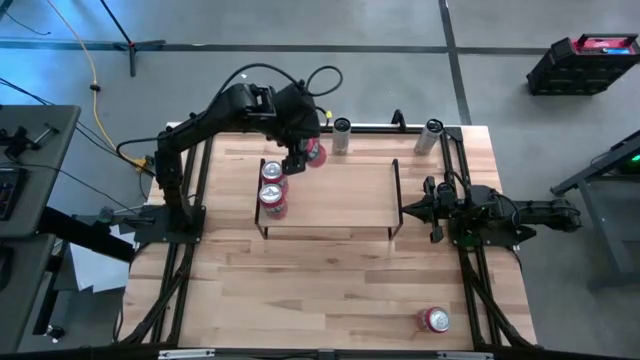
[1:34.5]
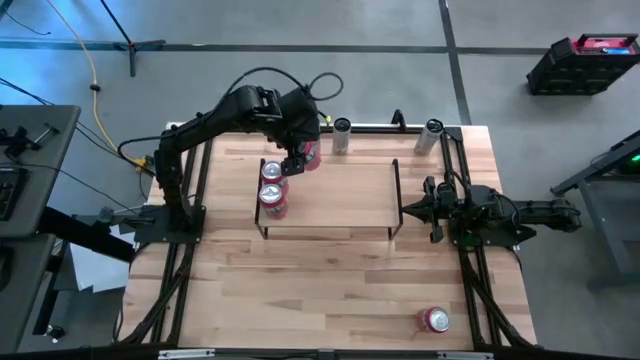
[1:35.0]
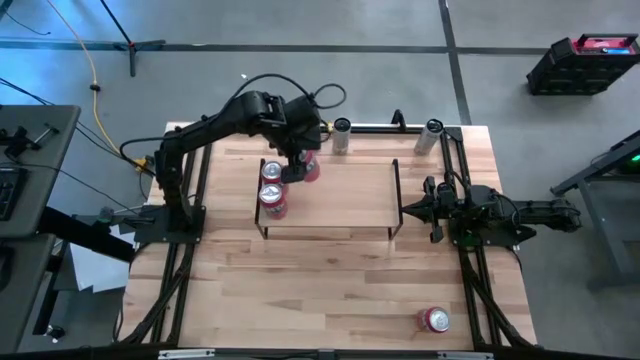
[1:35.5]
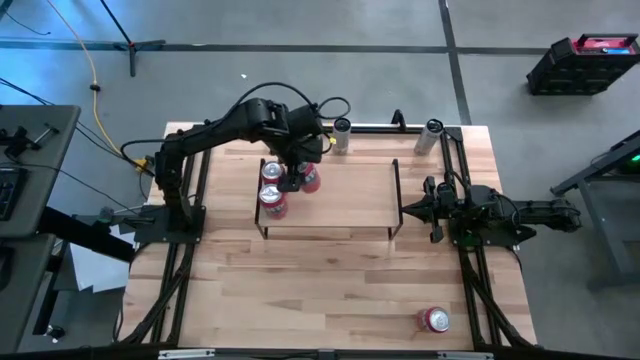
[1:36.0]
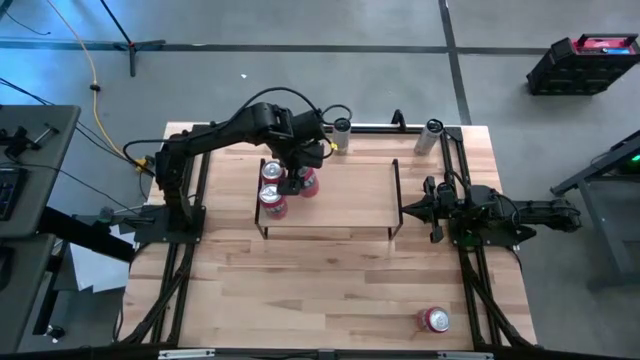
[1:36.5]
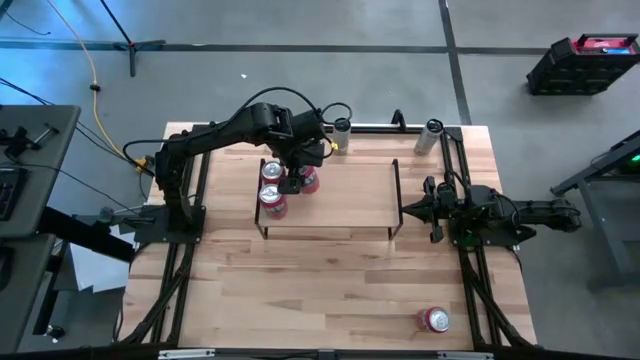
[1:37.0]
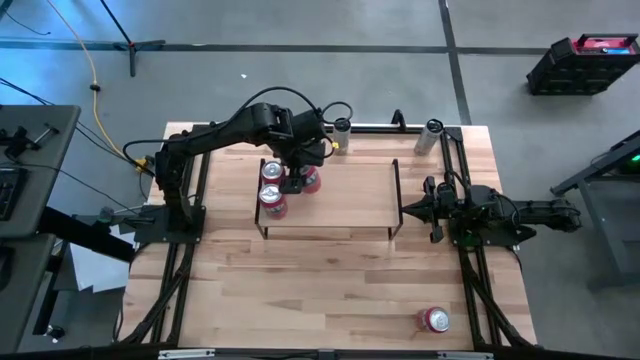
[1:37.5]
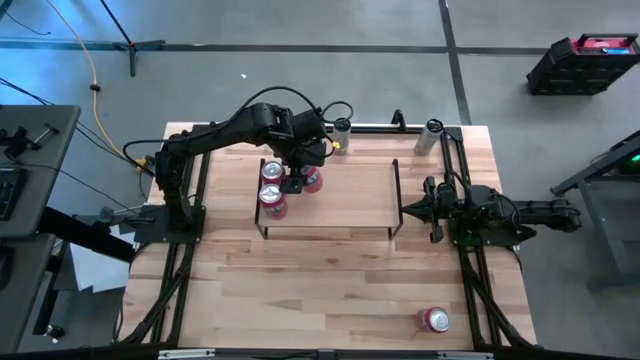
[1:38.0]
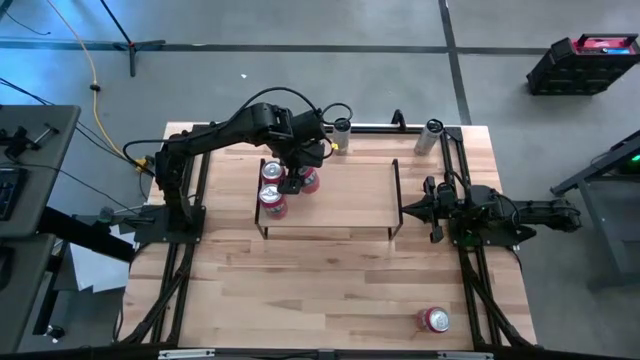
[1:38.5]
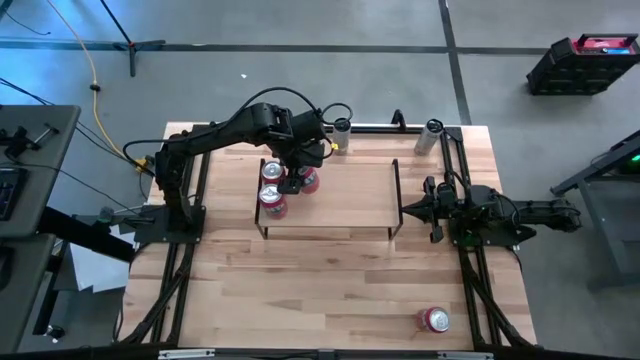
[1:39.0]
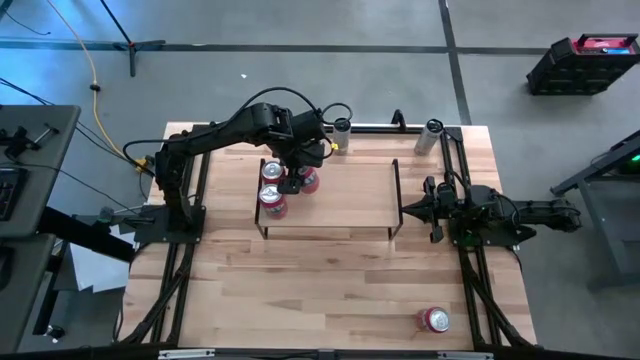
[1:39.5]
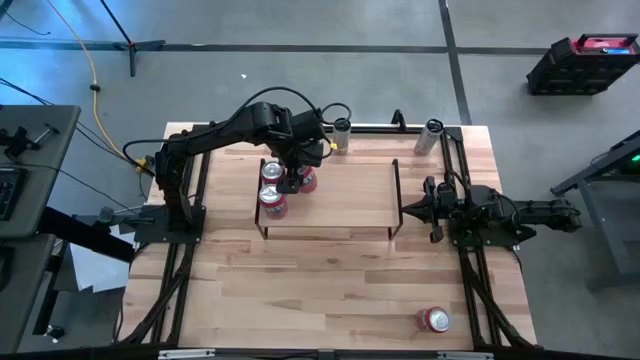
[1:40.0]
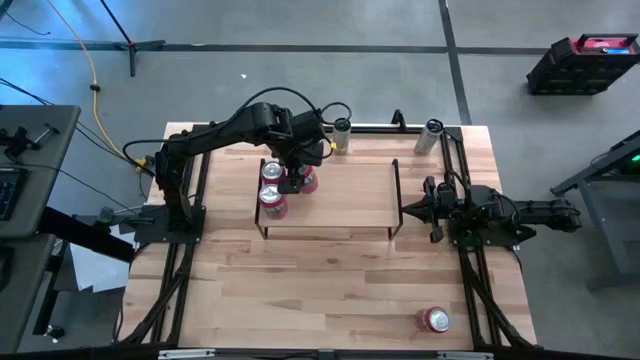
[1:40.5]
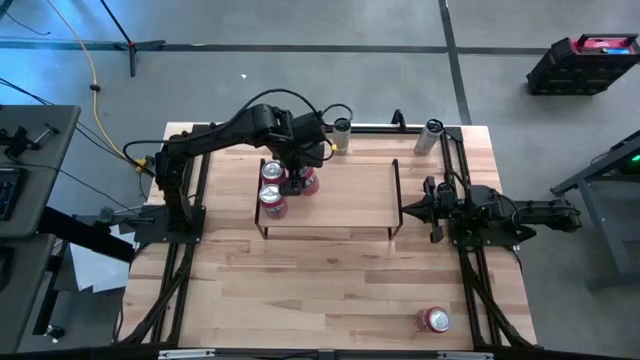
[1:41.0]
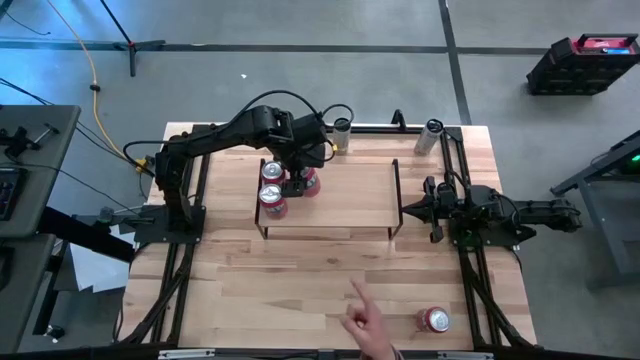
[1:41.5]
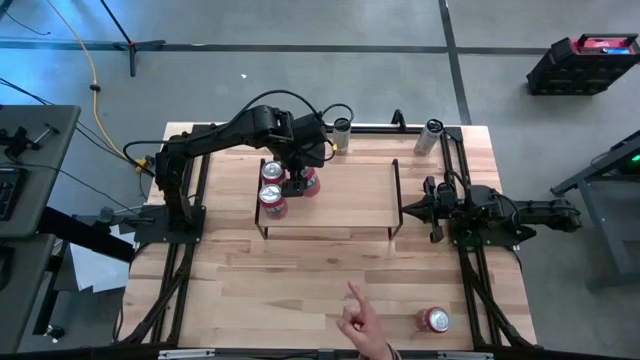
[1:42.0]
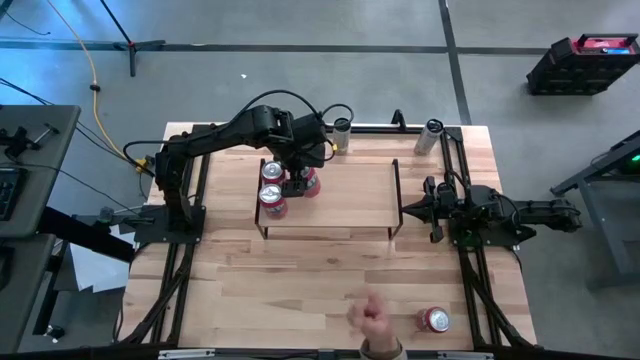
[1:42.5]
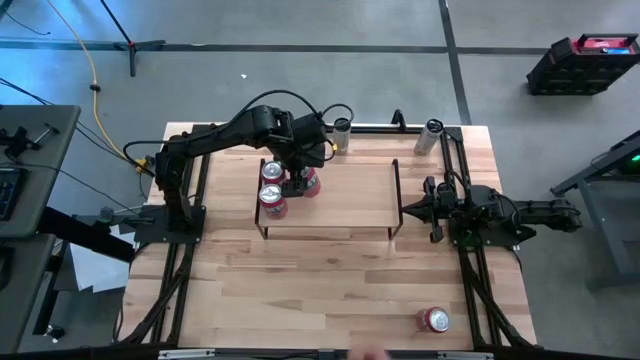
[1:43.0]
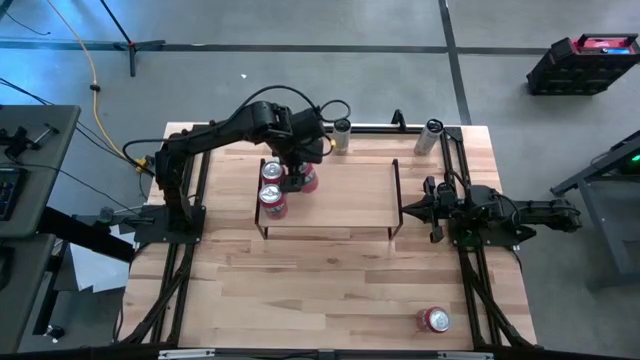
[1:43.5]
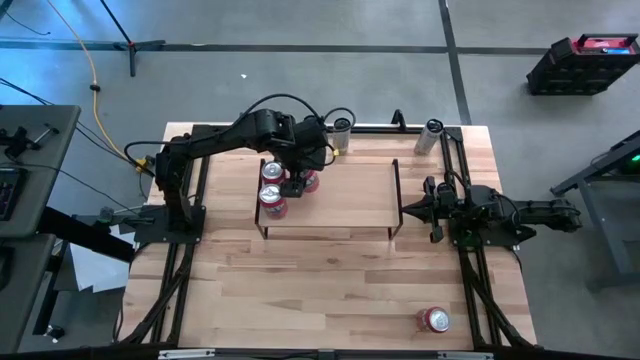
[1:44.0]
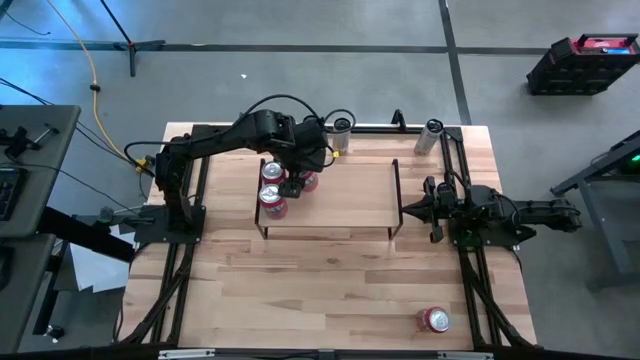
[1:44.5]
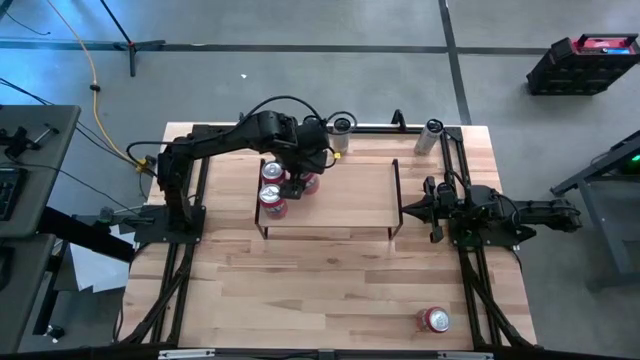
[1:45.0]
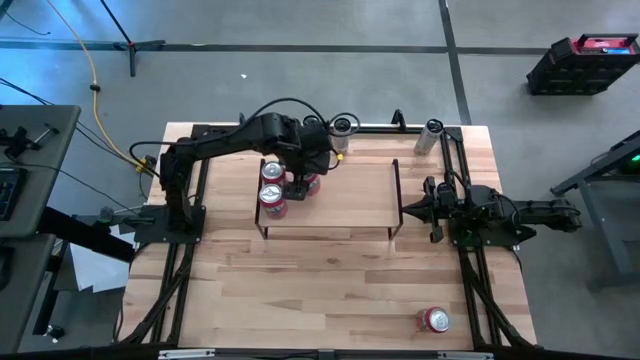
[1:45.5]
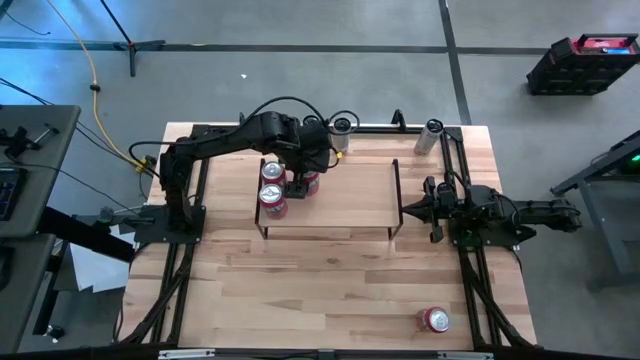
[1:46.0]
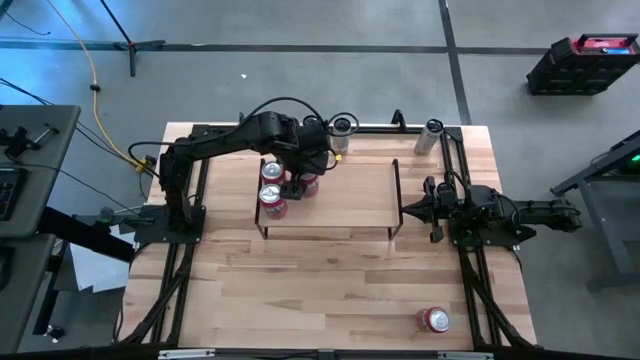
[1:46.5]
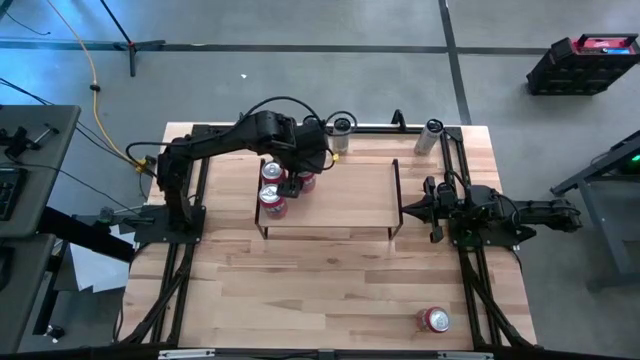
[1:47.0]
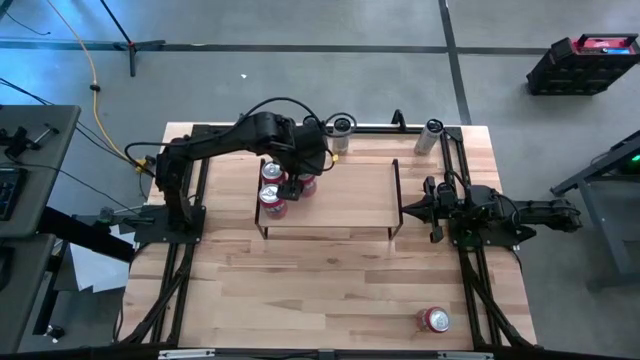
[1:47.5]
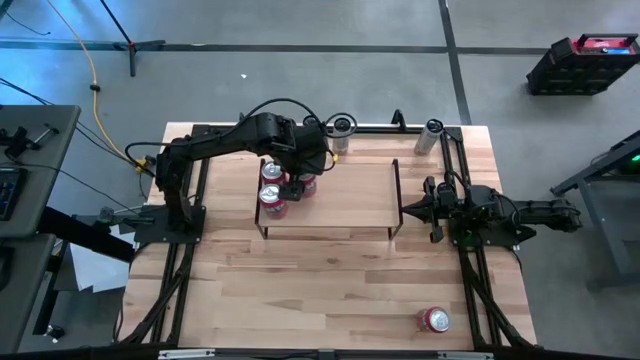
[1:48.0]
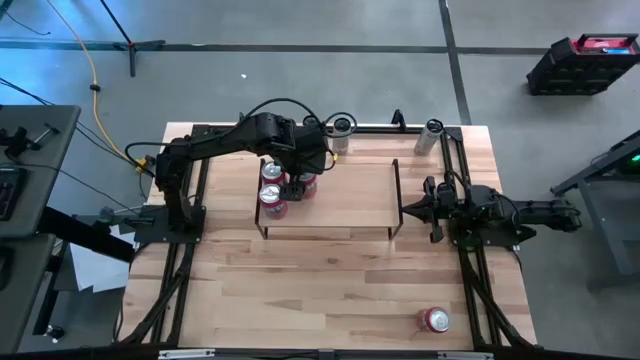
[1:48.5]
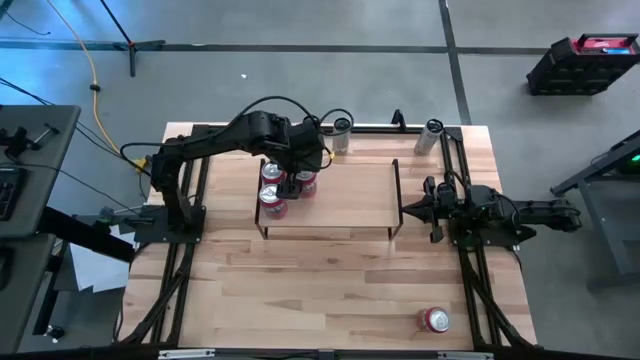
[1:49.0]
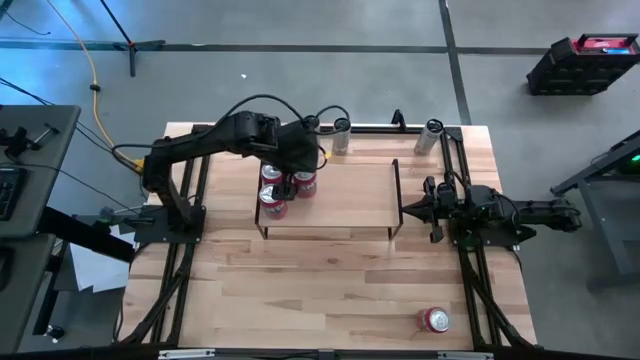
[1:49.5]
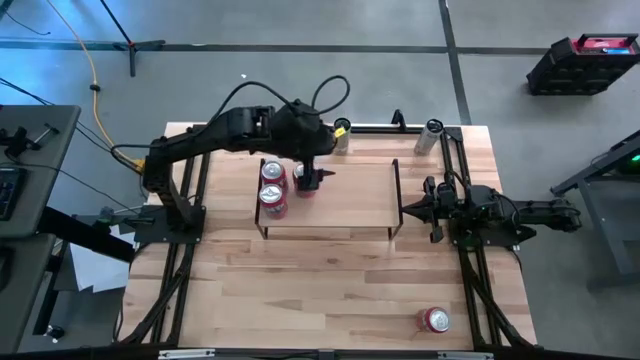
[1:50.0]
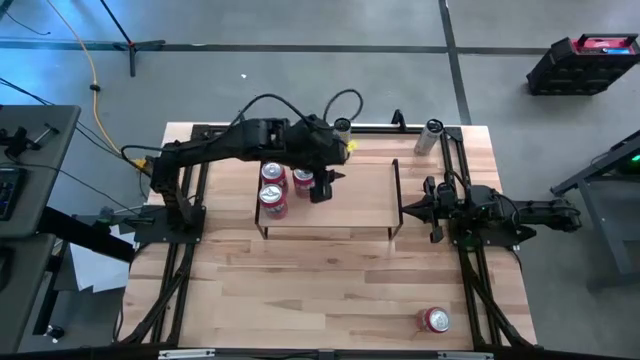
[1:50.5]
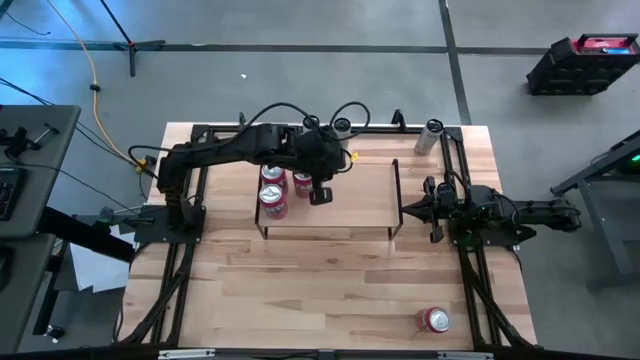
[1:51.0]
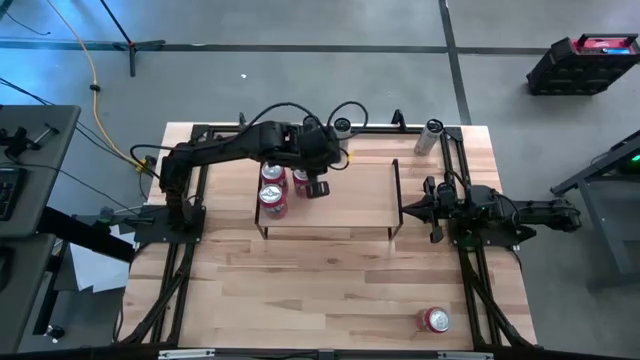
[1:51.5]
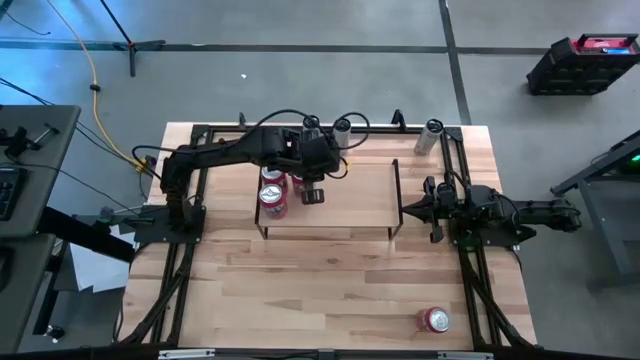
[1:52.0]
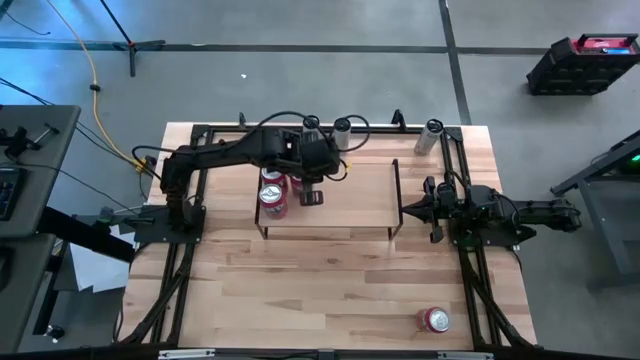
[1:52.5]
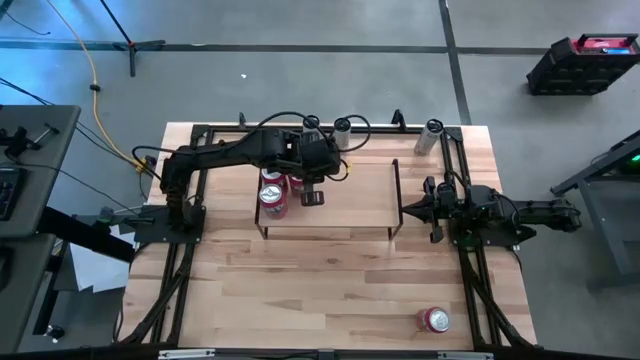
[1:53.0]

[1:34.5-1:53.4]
Task: Place canned beverage on shelf
Put the red soda can on the shelf

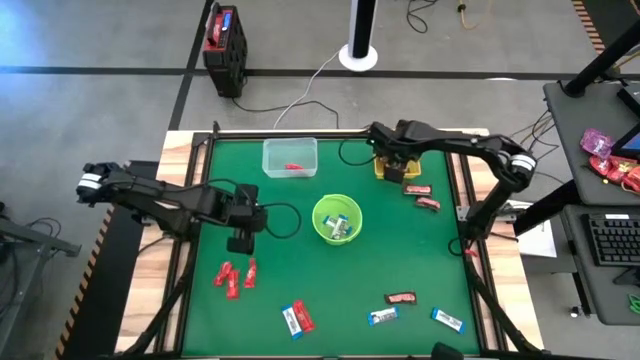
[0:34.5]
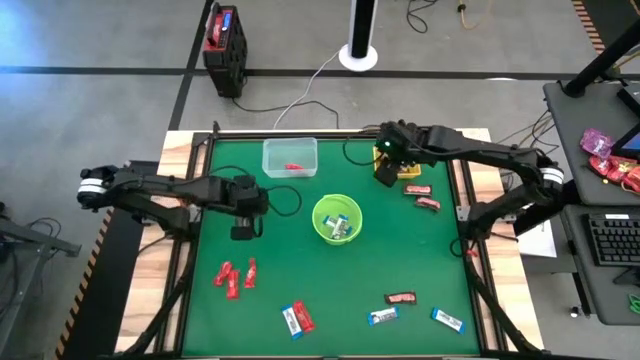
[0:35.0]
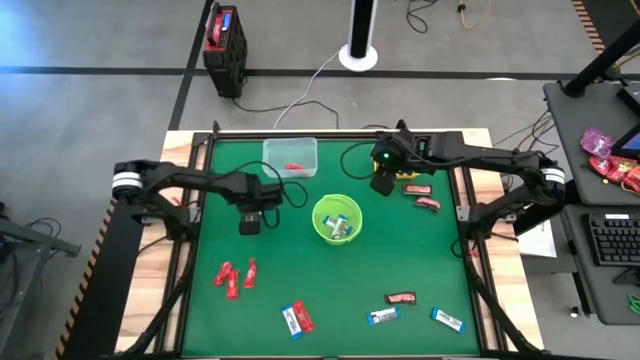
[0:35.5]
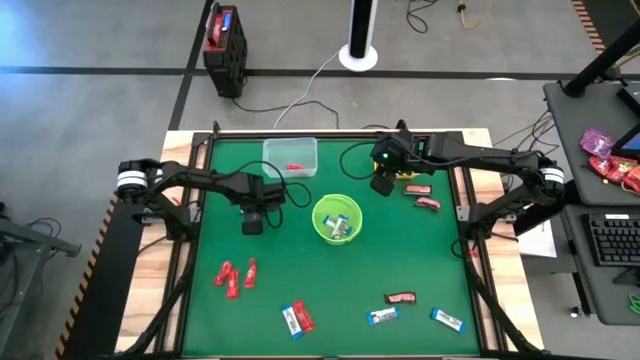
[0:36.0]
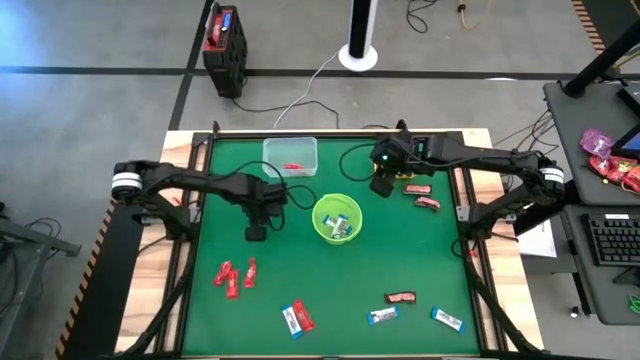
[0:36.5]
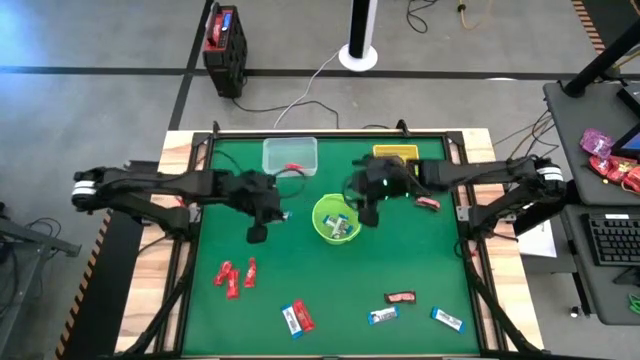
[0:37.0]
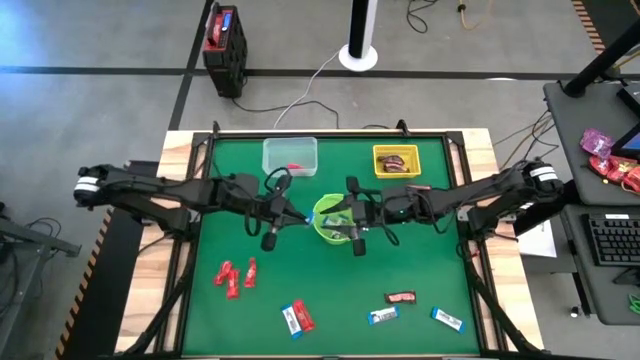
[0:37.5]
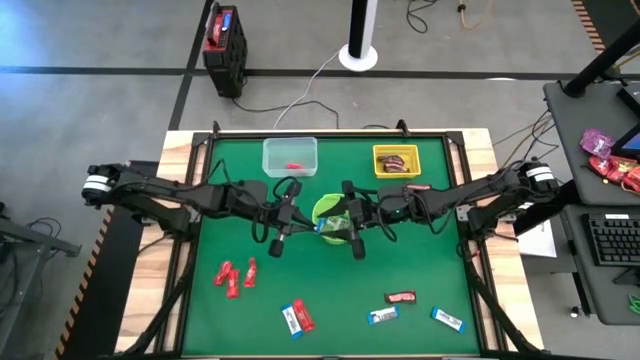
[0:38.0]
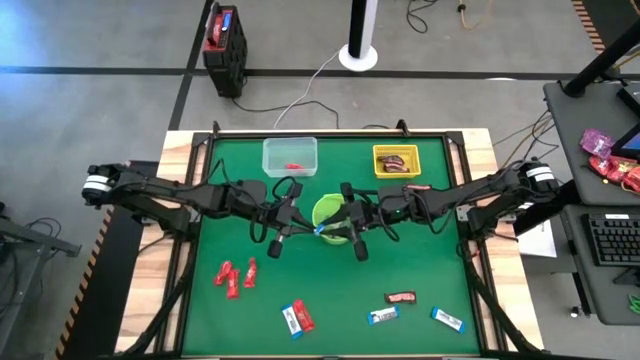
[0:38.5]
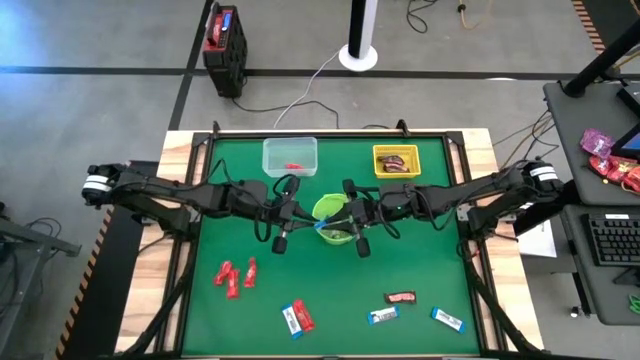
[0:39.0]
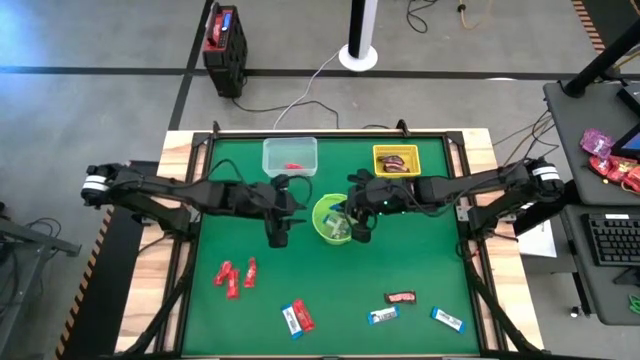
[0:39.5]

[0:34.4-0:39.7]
Task: Sort candy by brand, put in halloween buckets
Put the white chocolate into the green bucket
